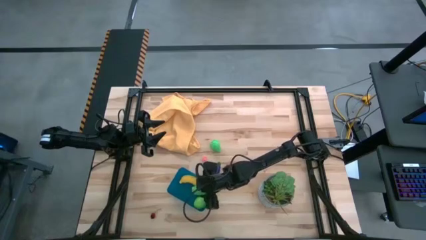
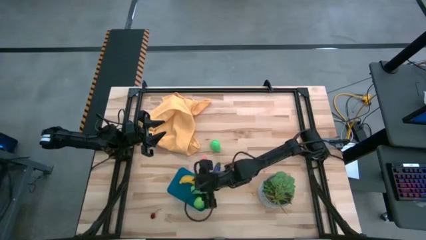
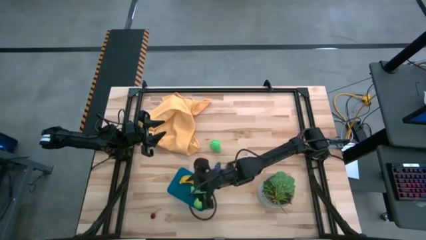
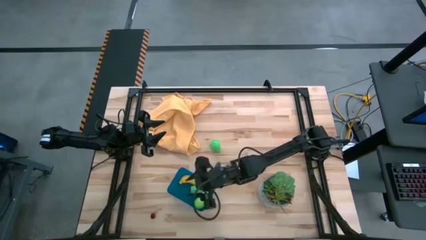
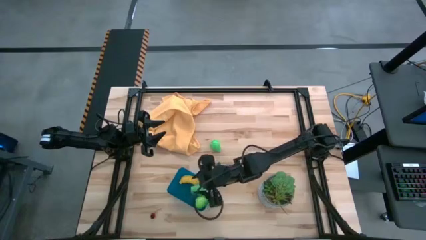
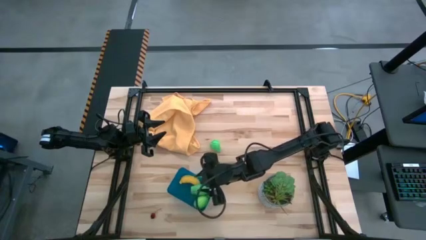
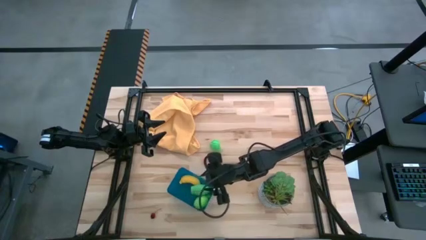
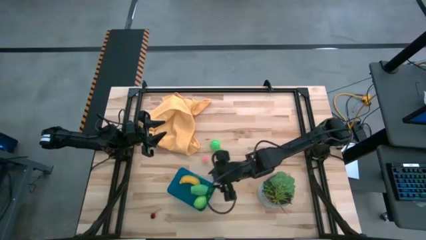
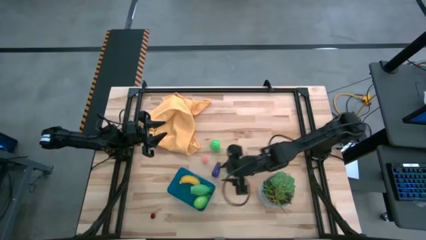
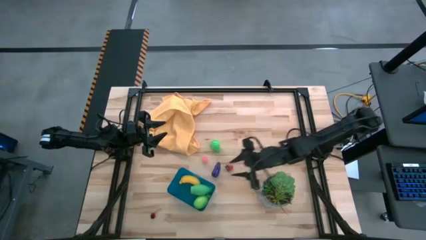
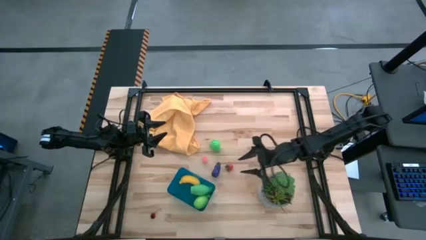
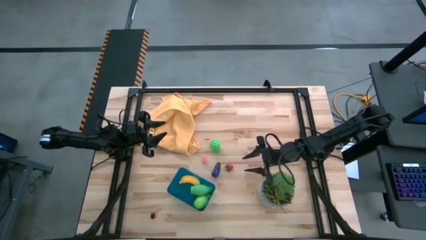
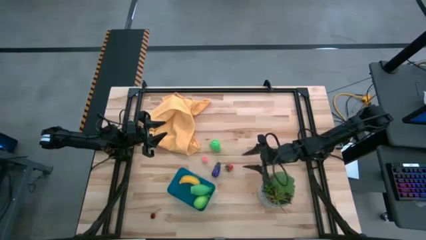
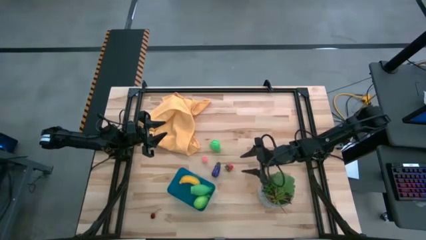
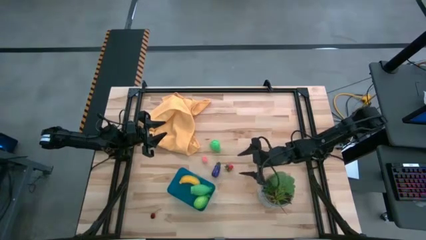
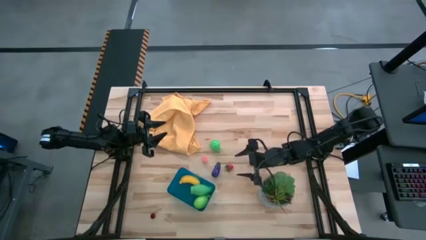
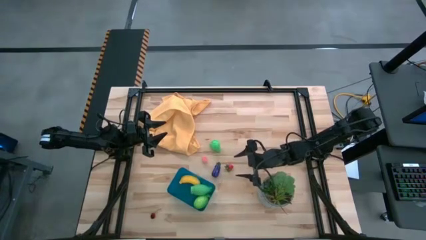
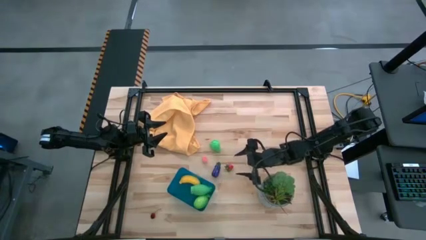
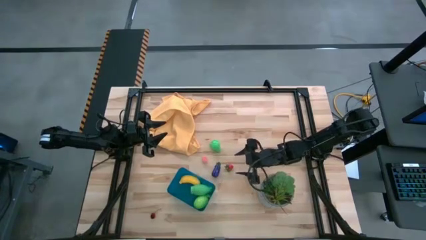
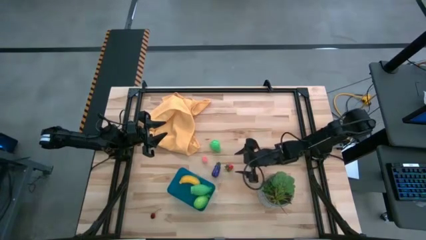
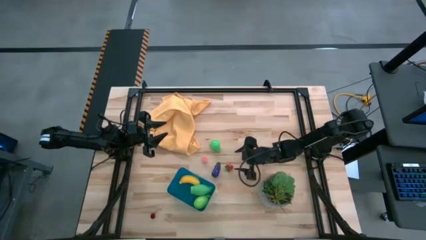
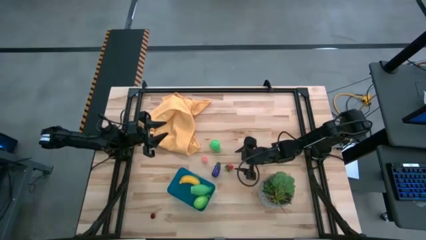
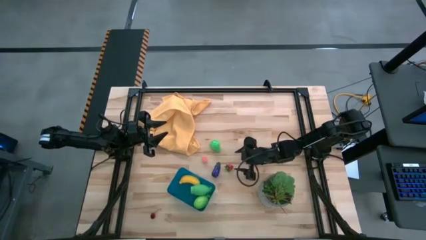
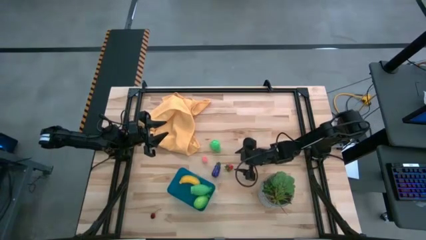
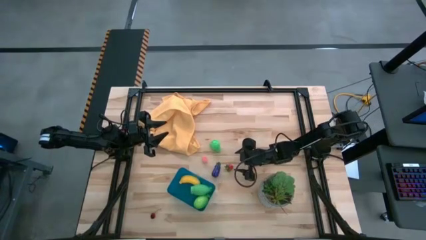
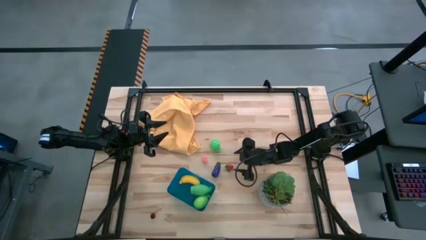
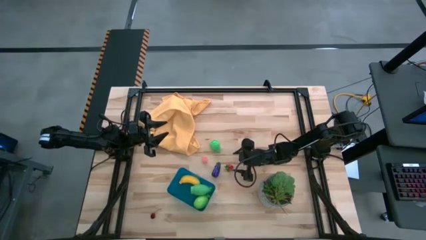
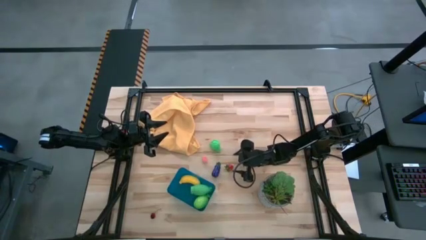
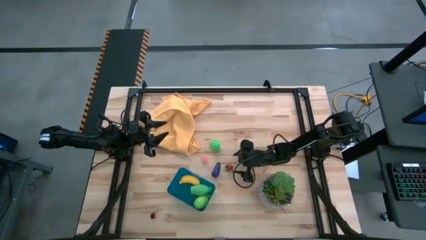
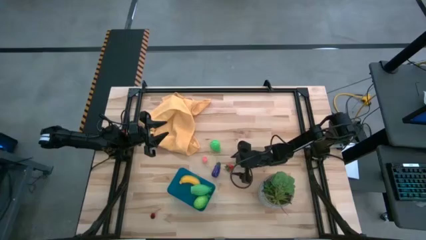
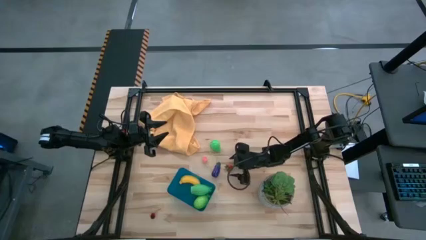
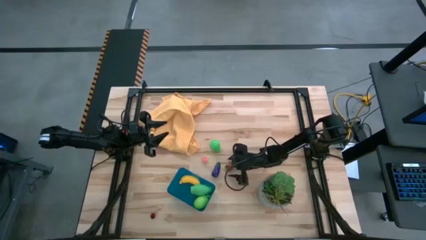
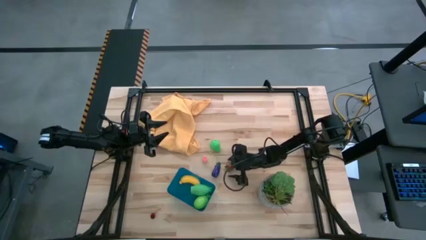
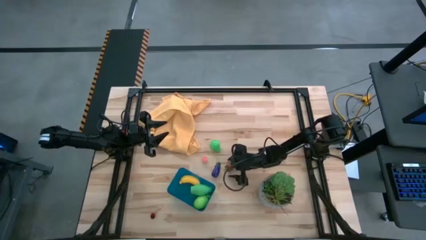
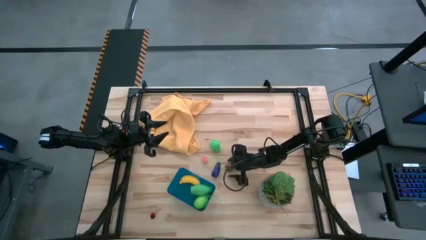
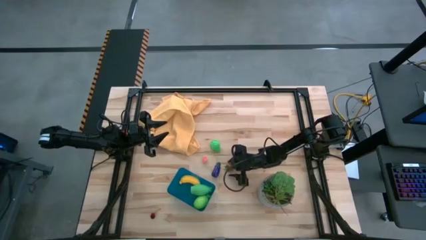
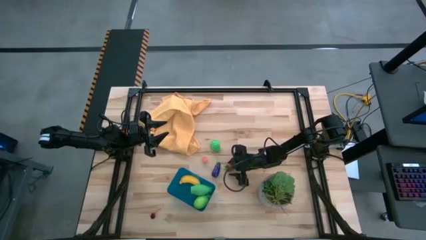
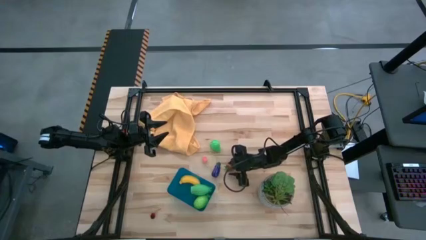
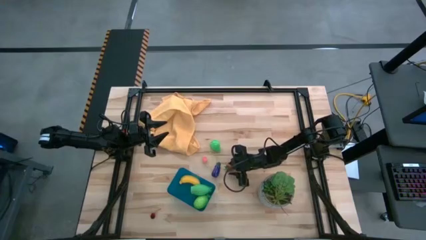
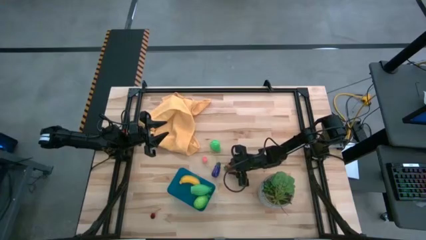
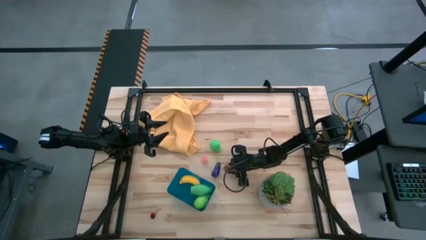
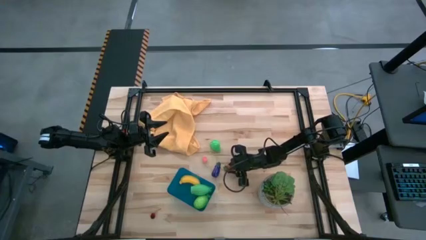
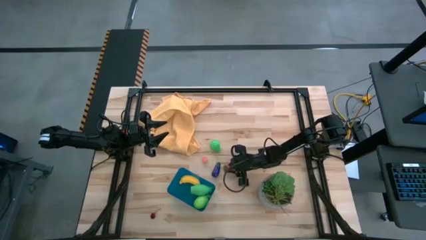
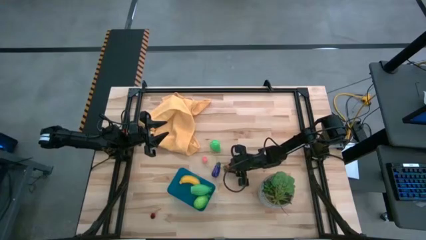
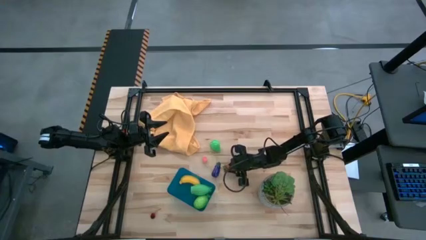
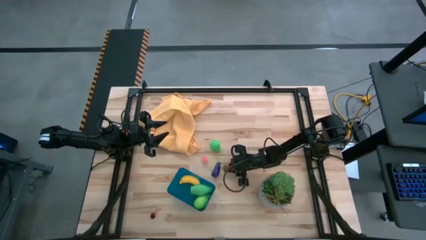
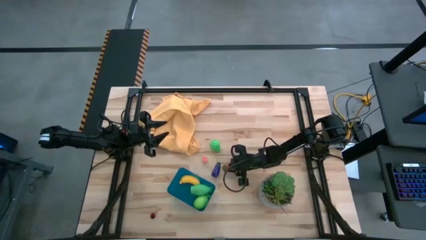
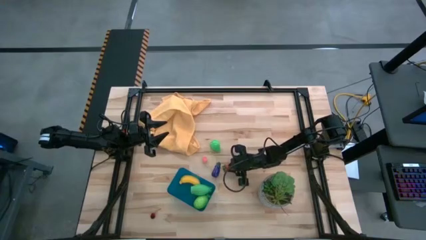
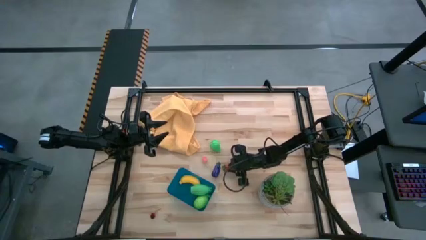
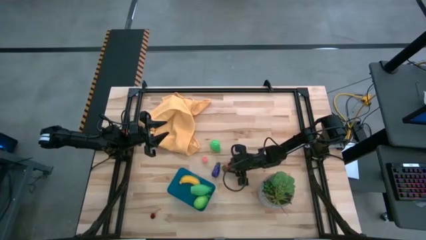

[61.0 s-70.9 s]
Task: Pick and placing Produce into tupperware
Put the strawberry into the blue bin

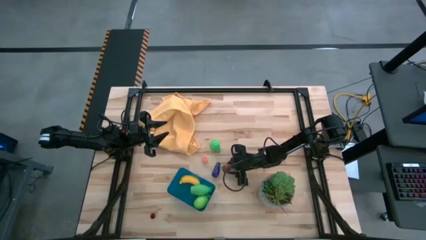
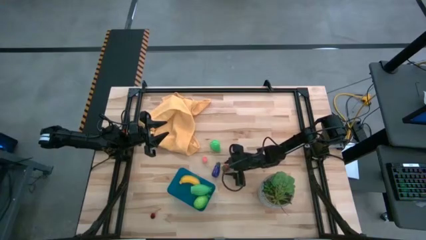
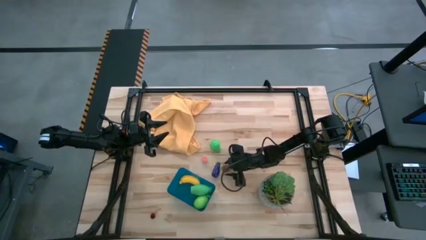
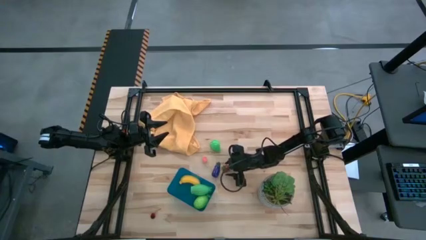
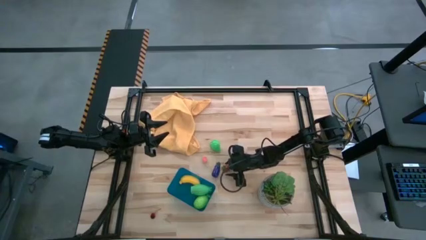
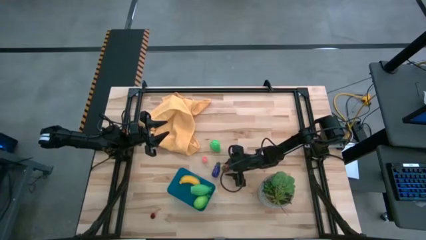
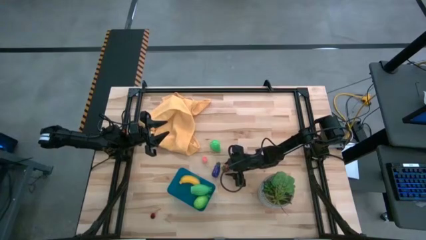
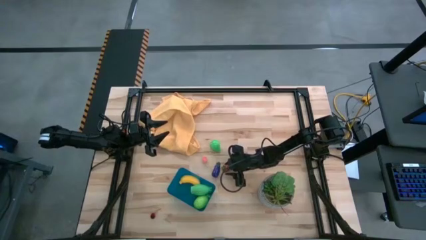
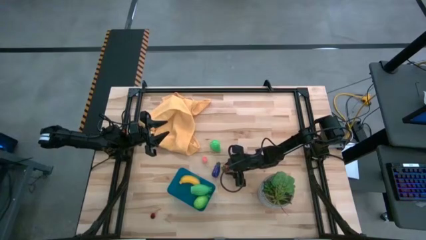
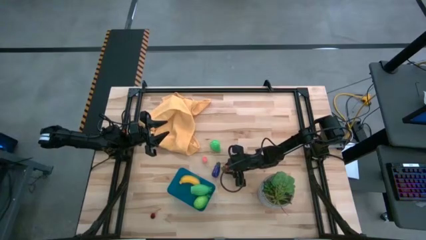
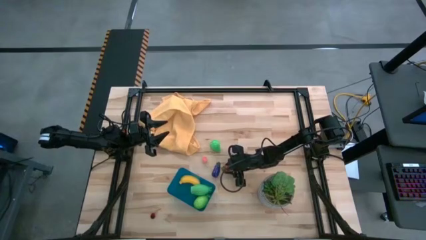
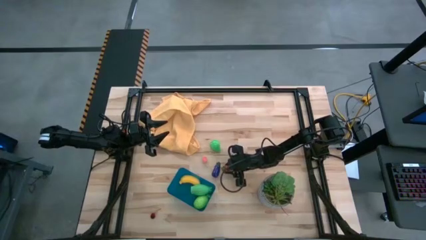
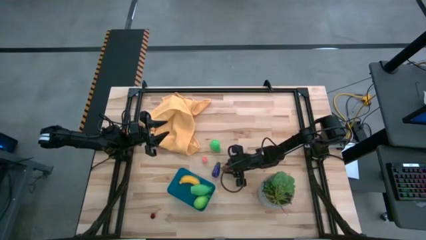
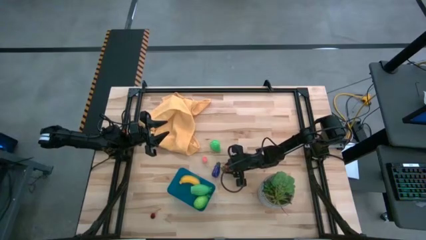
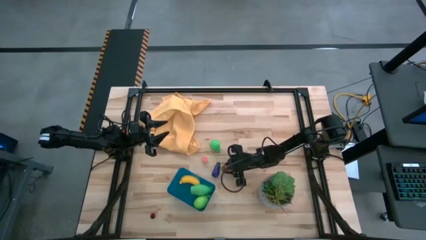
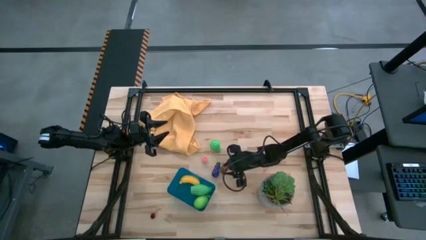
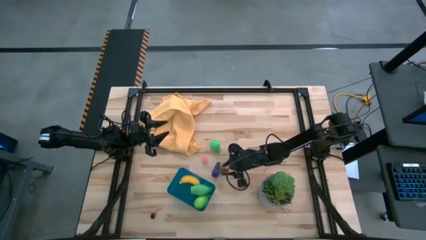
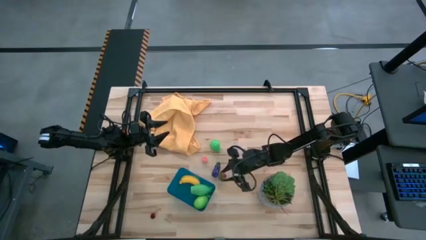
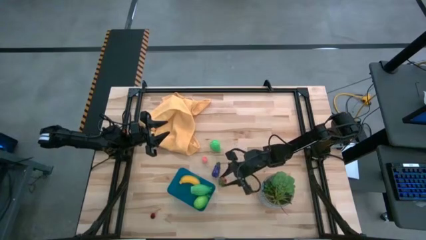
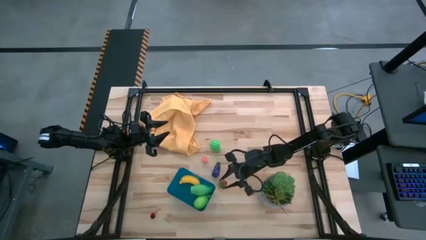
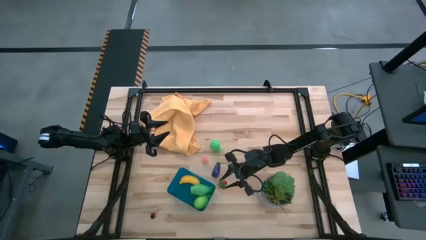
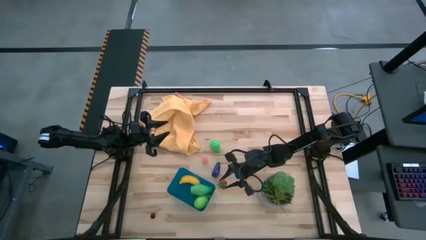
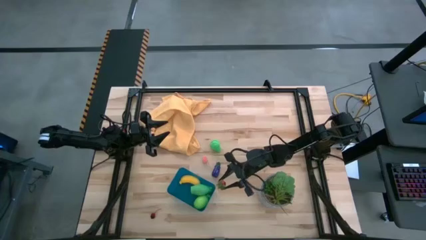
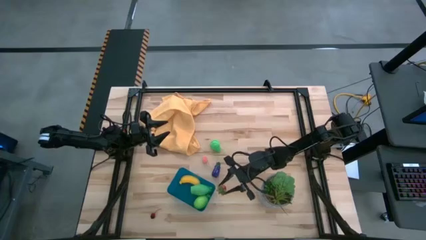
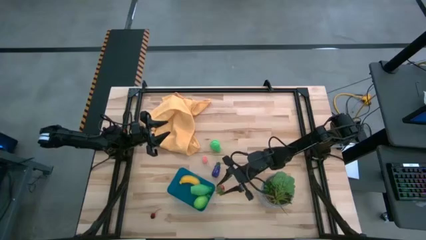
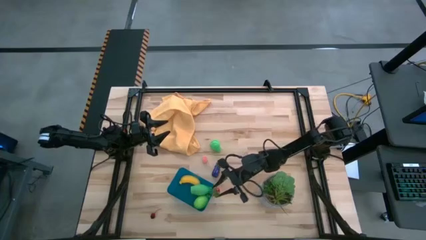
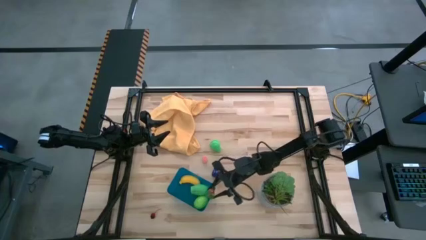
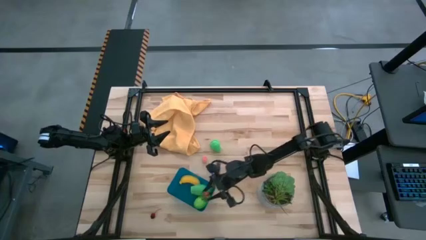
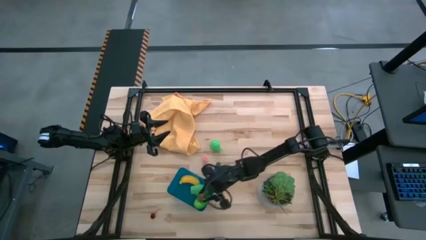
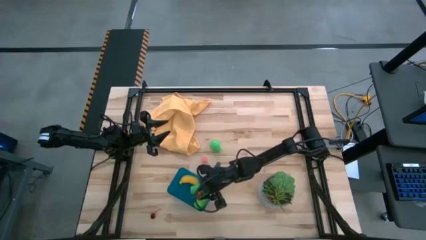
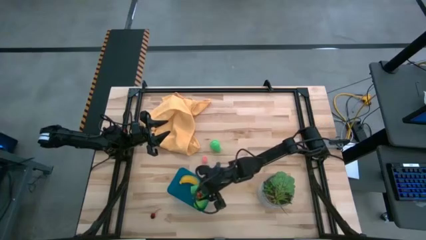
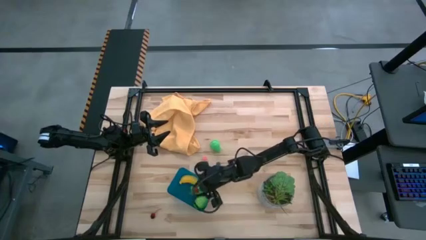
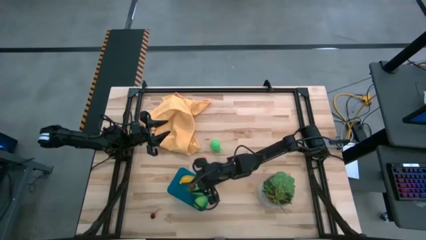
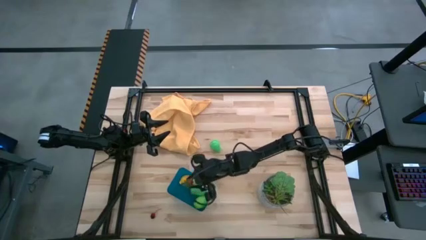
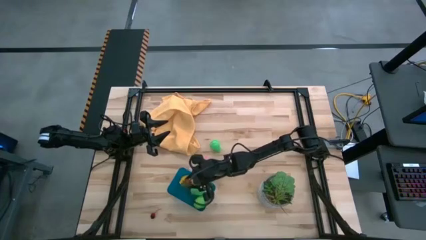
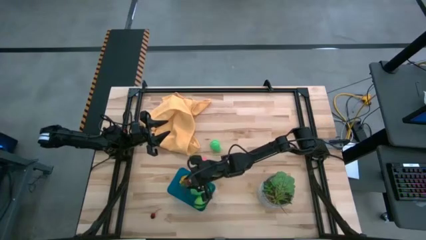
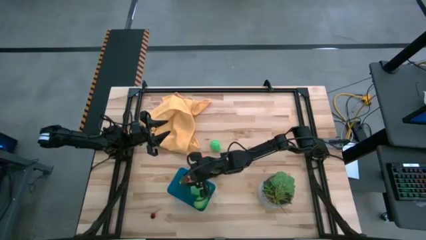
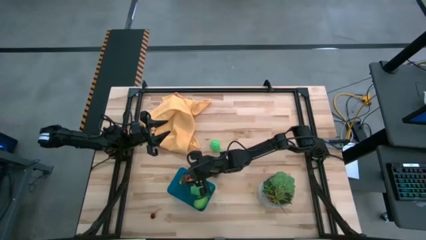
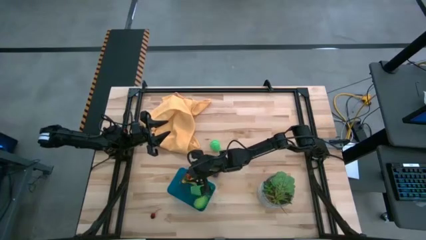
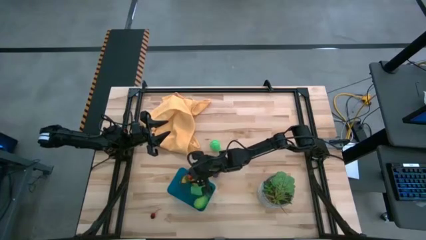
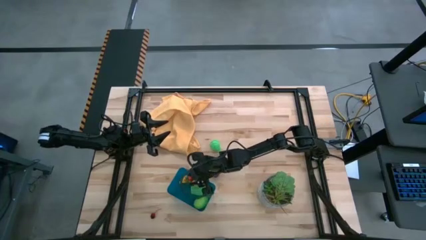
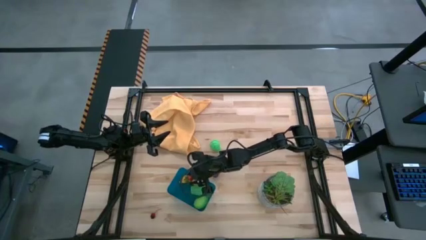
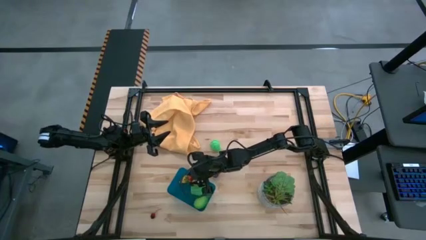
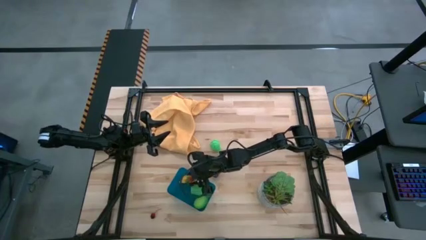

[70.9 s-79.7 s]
Put the strawberry into the blue bin
